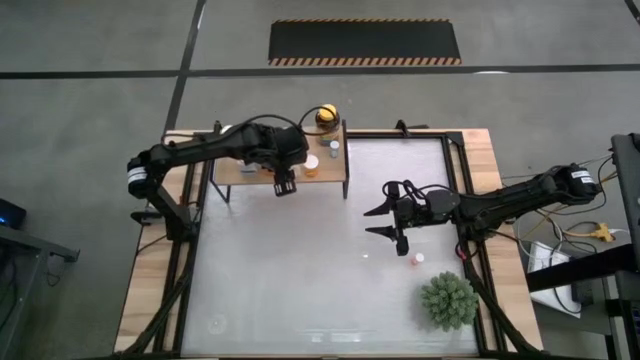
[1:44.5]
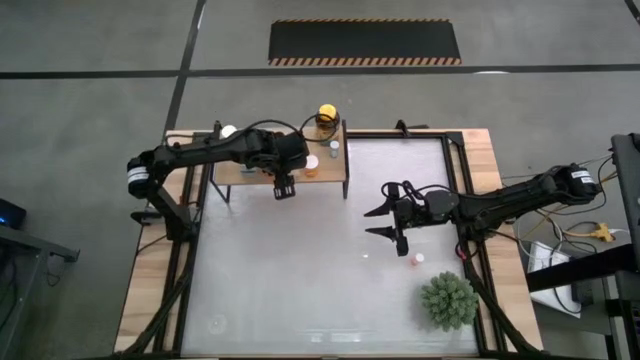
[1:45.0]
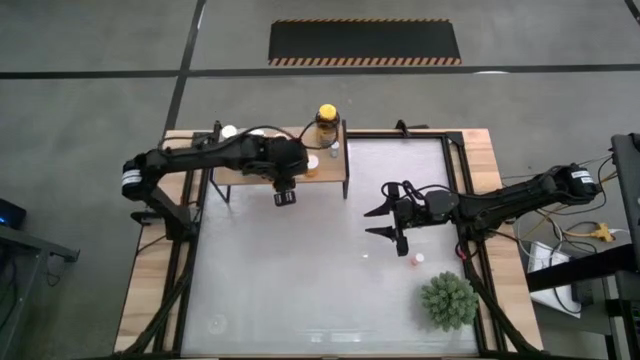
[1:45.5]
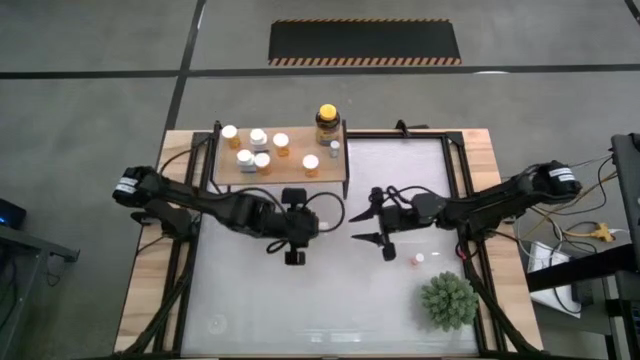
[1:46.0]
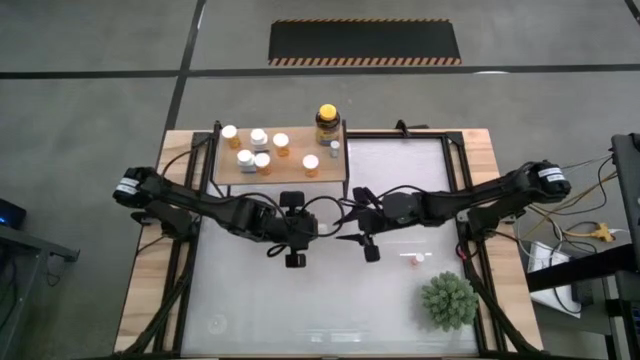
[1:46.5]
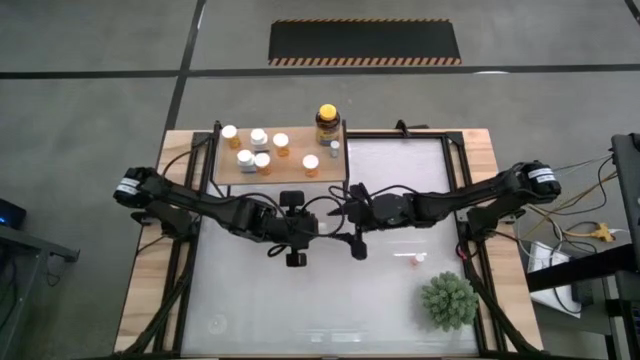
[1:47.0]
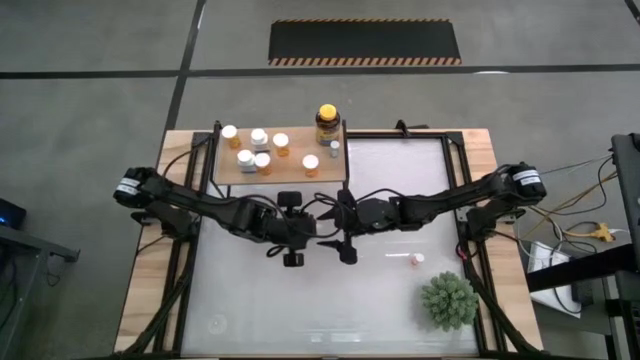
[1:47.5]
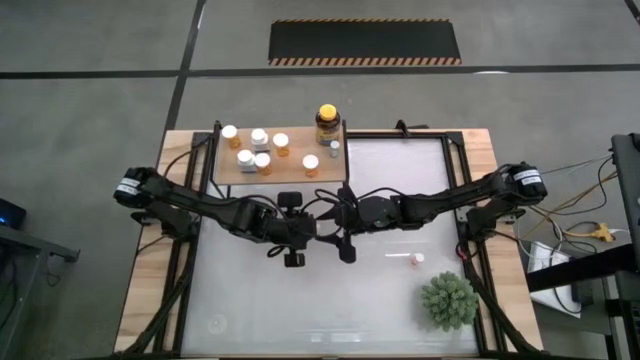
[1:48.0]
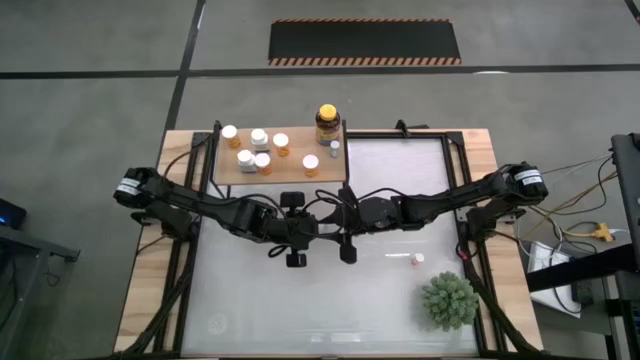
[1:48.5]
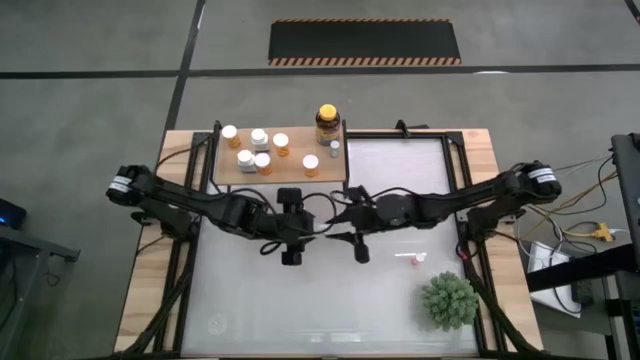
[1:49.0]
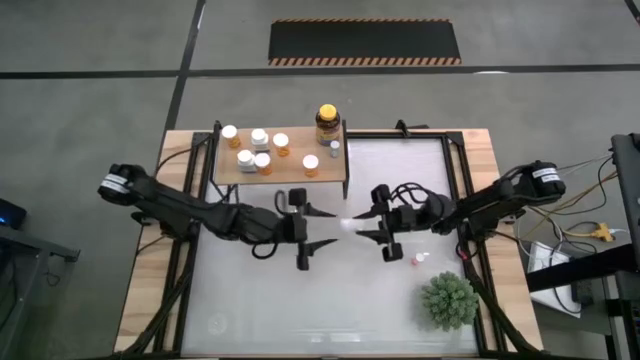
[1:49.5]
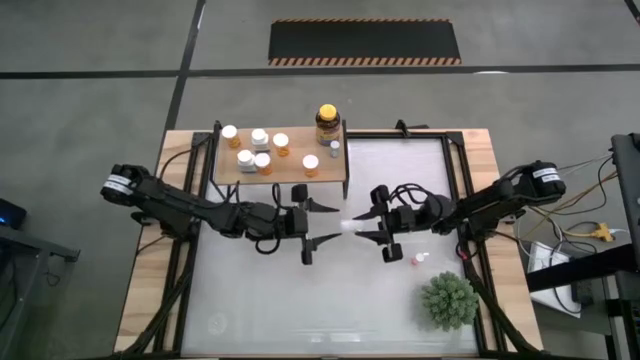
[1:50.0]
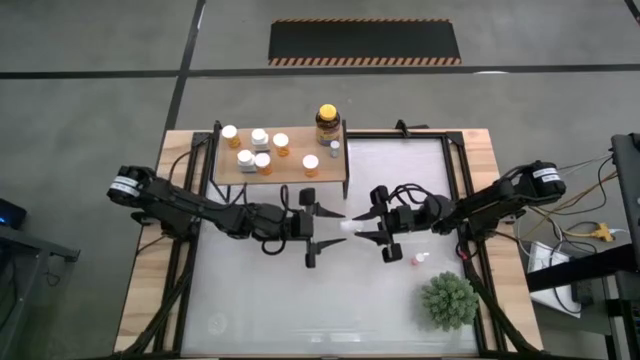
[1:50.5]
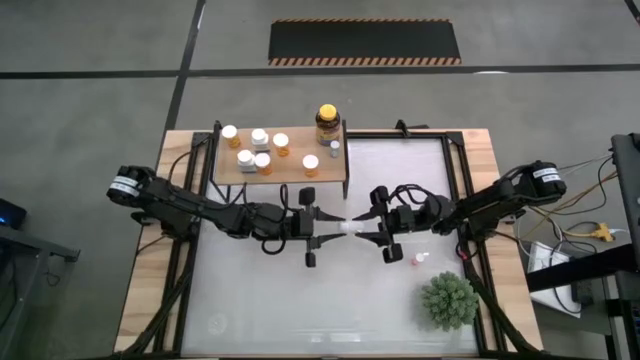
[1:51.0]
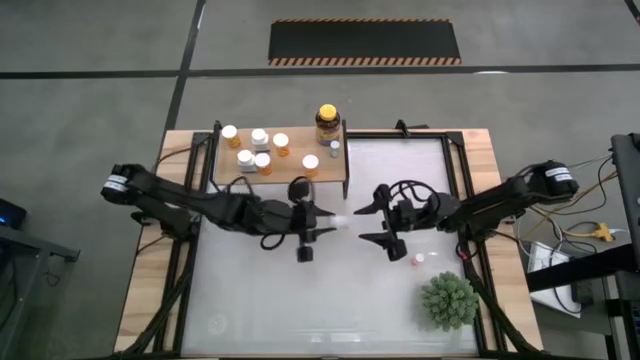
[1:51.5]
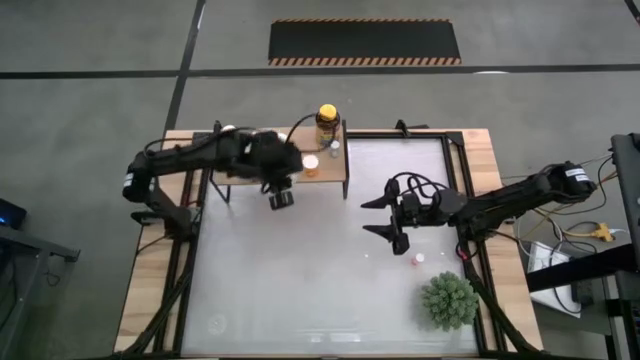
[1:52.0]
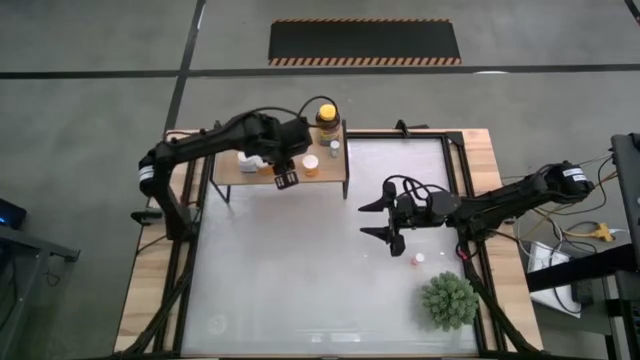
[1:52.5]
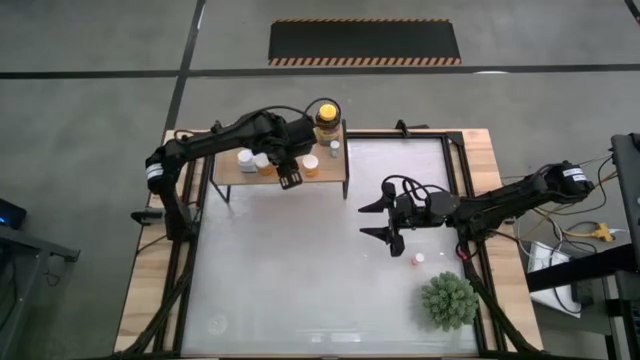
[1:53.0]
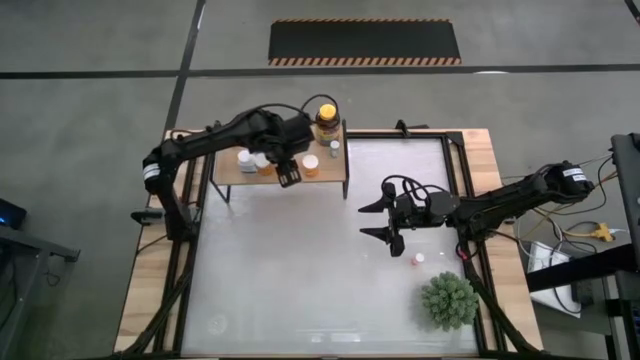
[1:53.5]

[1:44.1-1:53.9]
Task: Pick and place medicine bottles onto shelf by color
Put the white pill bottle on the shelf

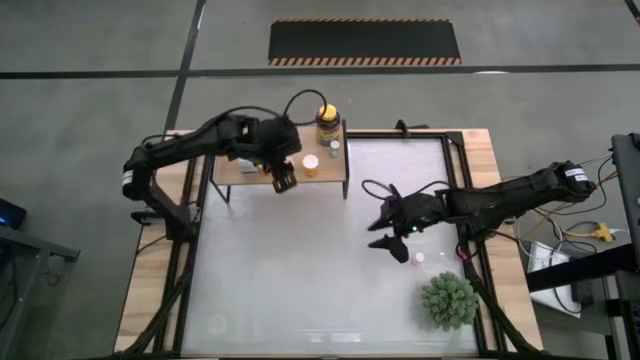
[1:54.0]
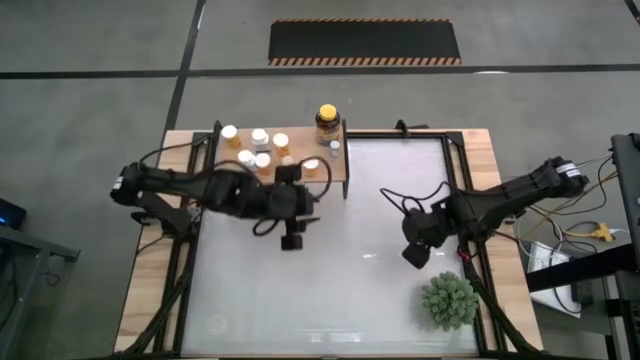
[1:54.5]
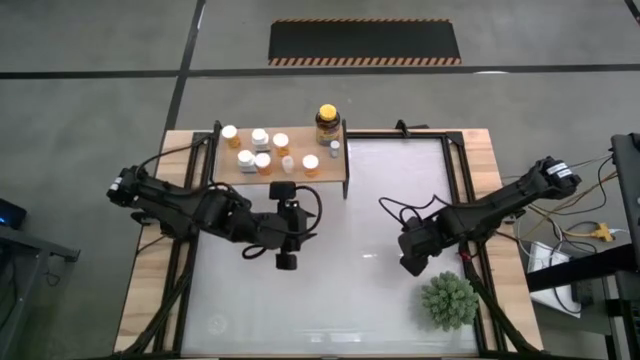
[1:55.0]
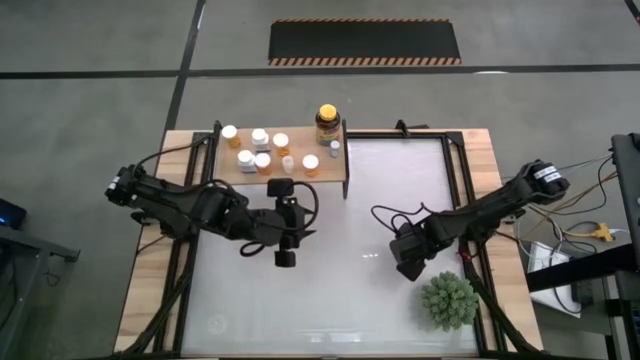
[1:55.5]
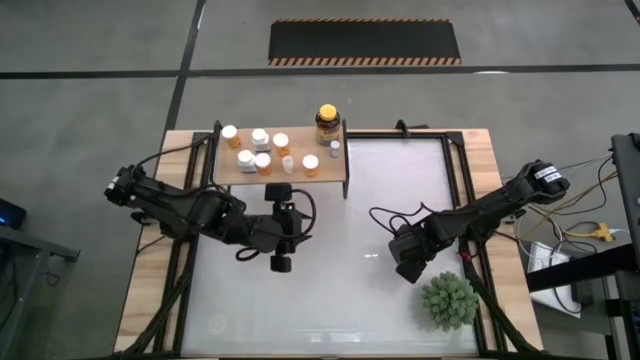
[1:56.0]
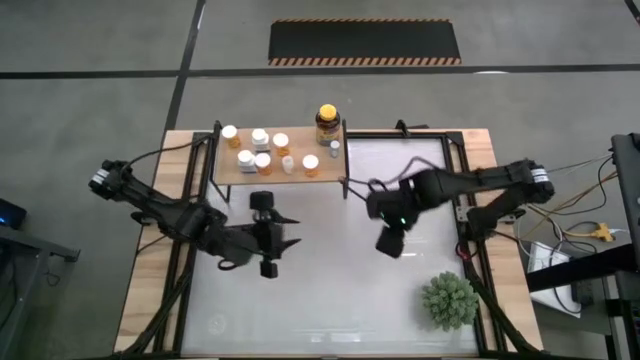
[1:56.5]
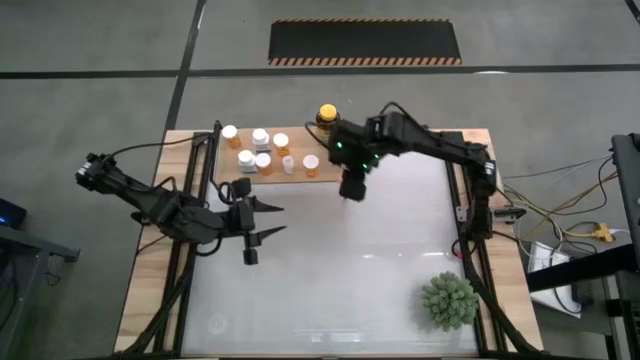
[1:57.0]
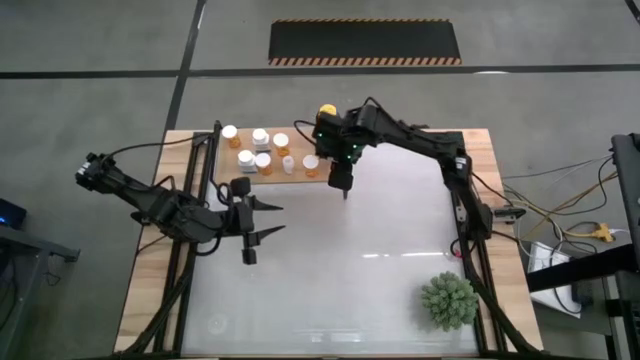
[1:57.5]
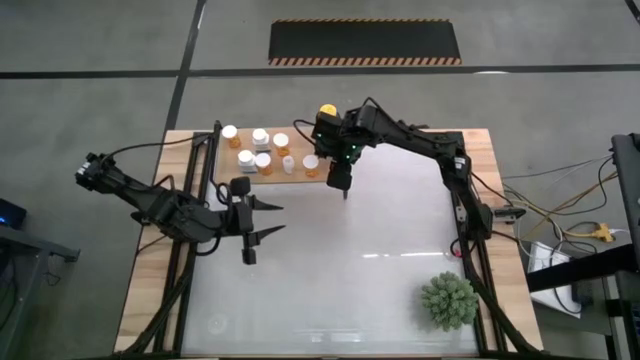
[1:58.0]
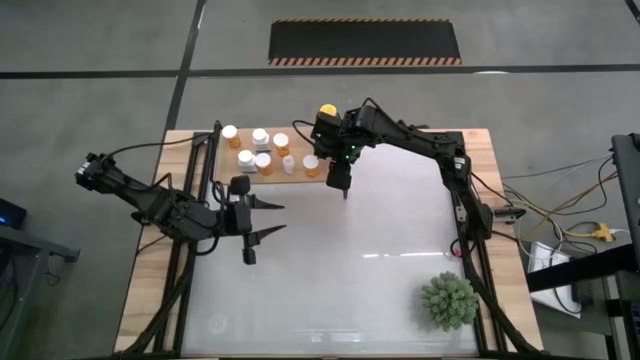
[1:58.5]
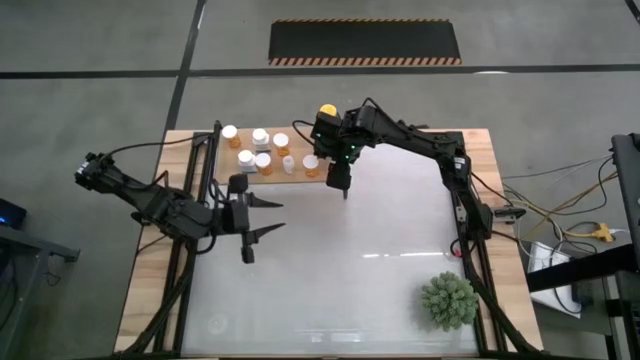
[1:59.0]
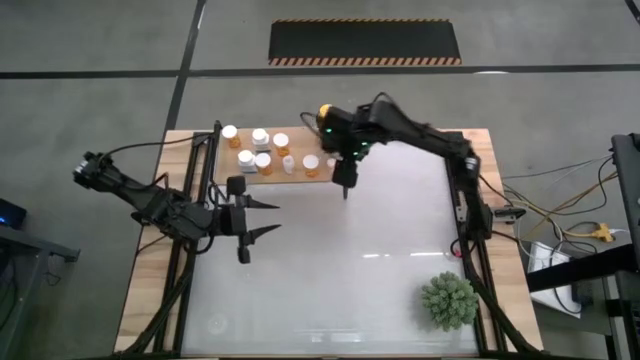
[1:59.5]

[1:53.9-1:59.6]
Put the pink pill bottle on the shelf

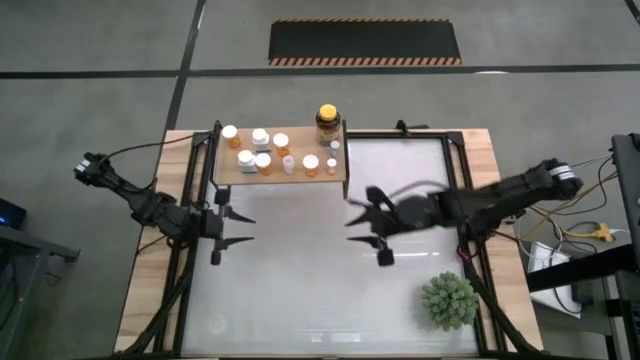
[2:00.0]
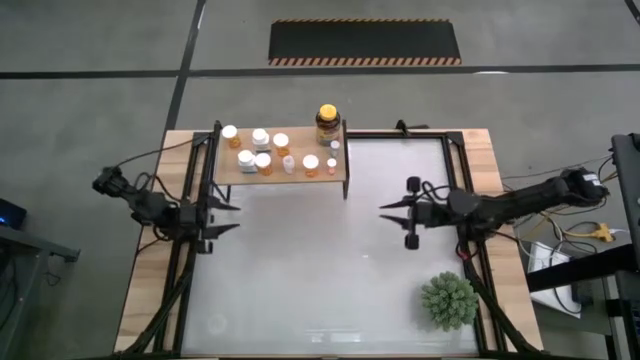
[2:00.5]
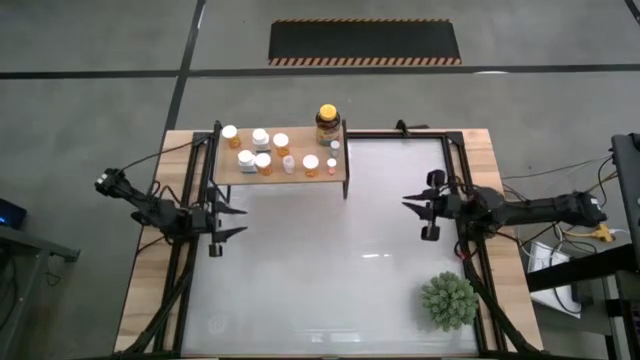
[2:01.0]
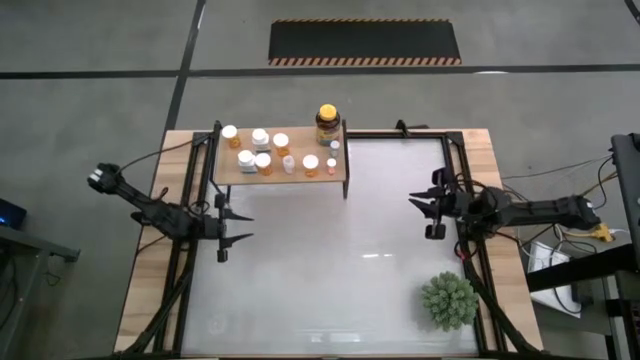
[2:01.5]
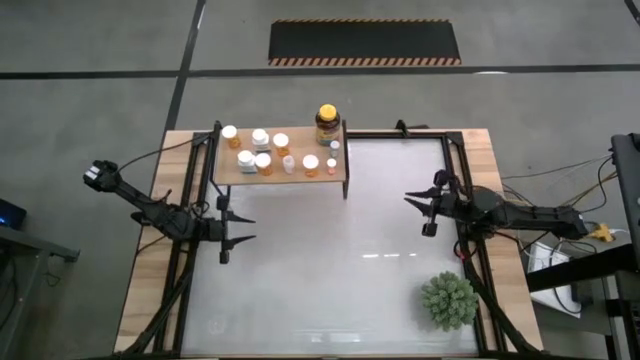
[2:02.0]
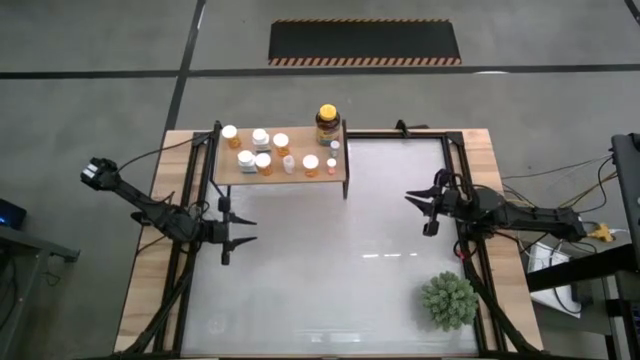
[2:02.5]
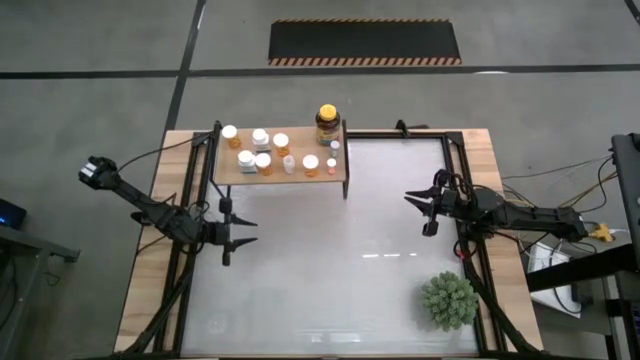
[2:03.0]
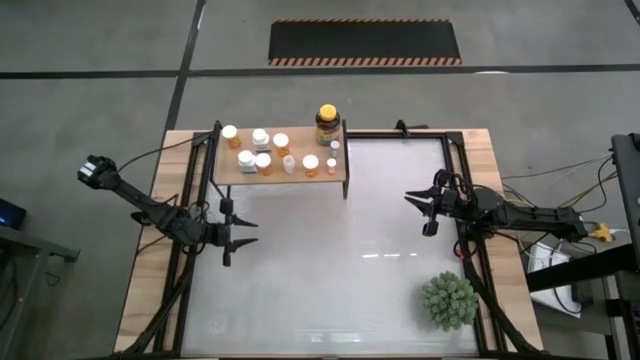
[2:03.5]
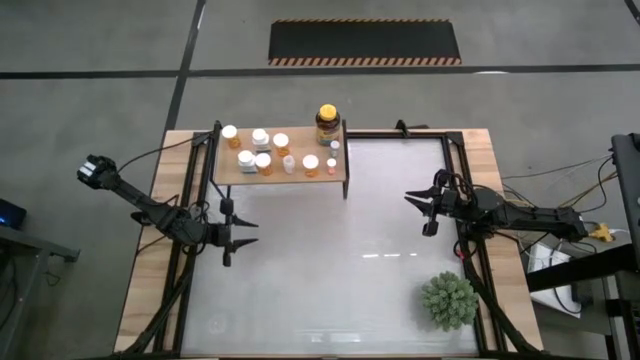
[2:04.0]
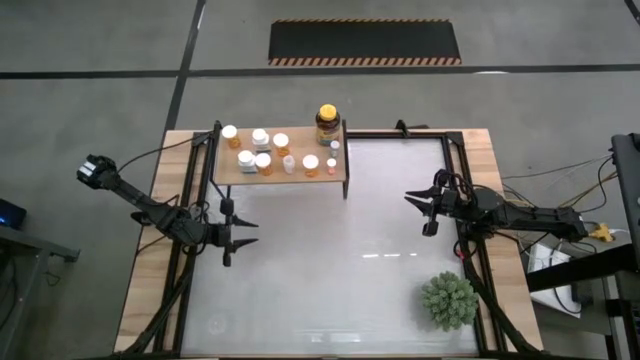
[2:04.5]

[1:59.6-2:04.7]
Return to Home Position

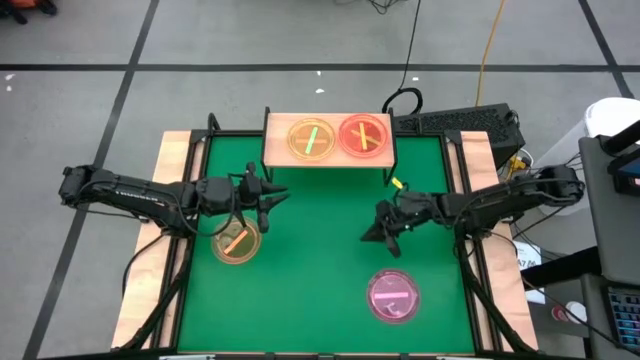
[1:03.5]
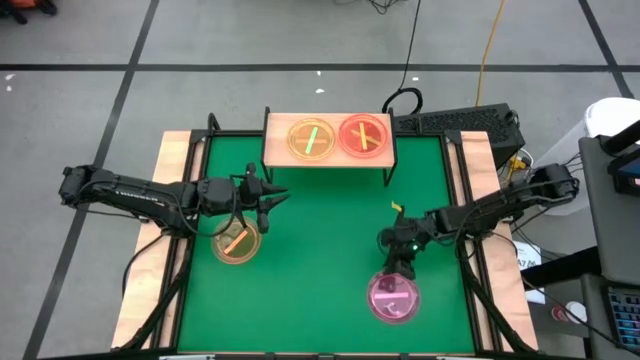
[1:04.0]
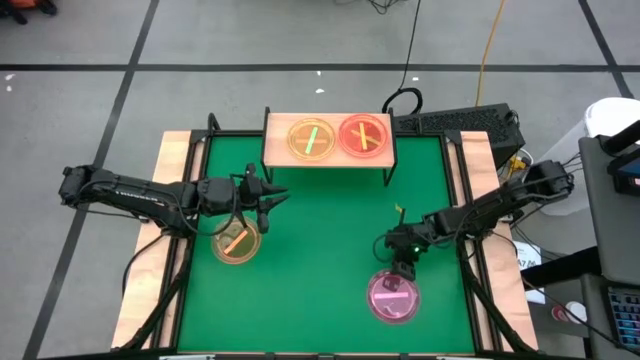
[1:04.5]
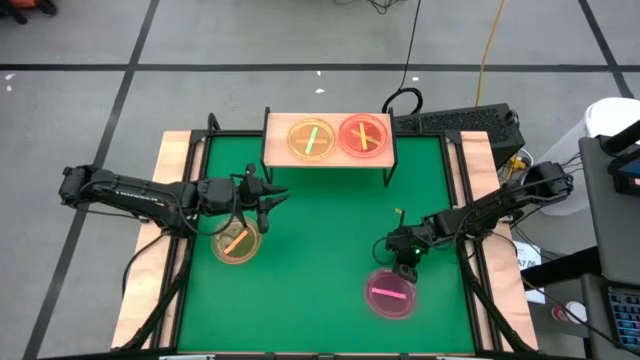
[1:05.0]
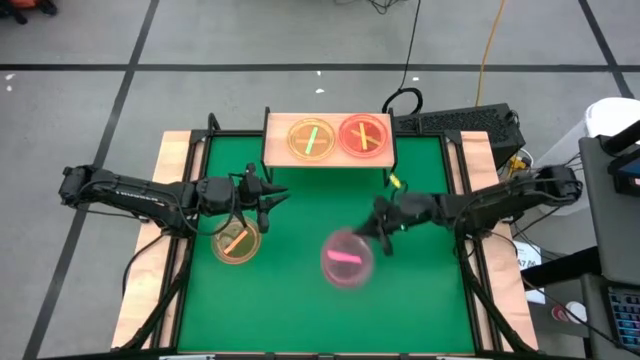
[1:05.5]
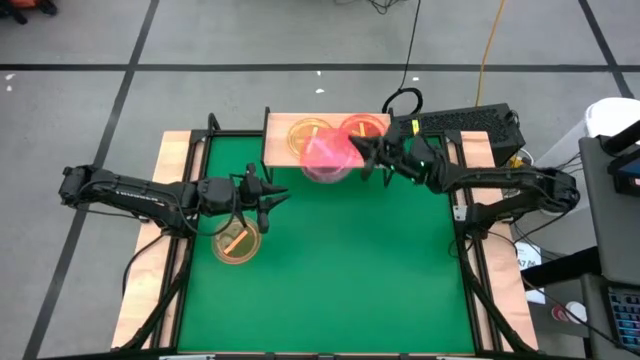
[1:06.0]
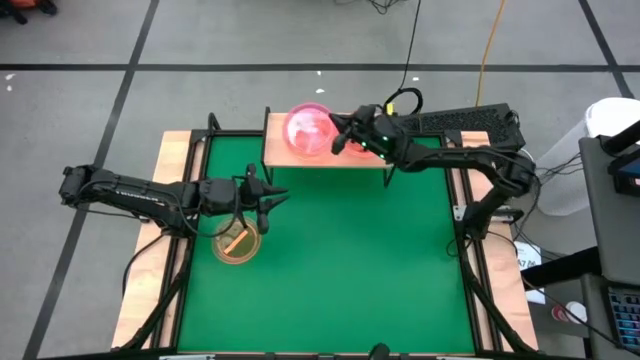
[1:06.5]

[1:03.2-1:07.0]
Task: Place and stack plates onto a shelf
Stack the pink plate on top of the green plate on the shelf
